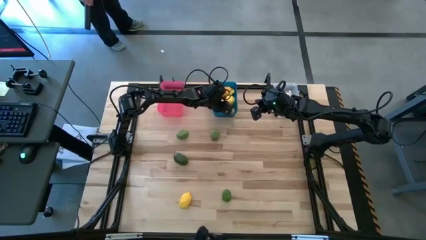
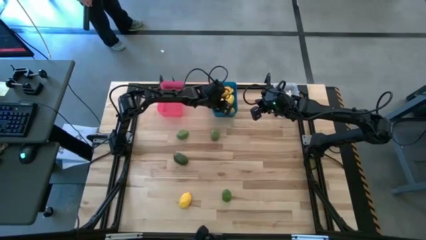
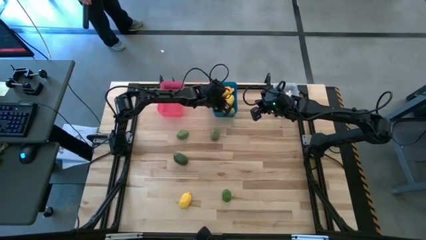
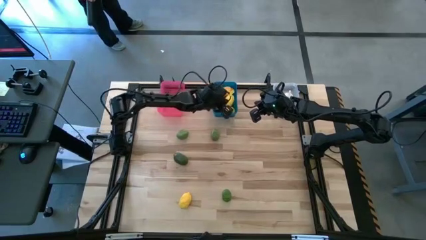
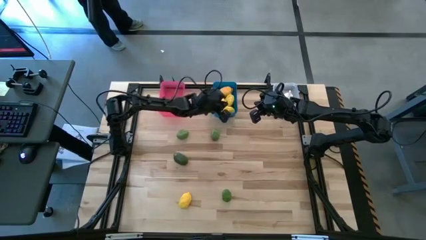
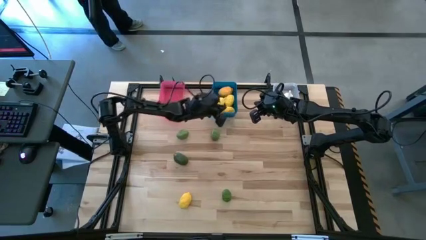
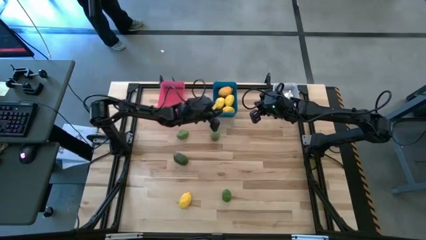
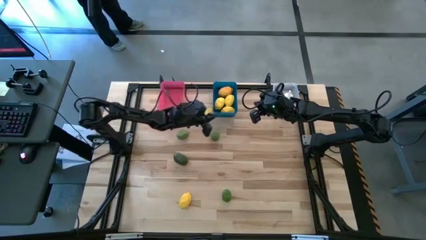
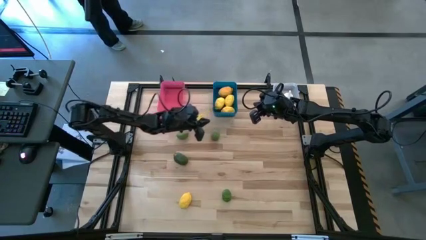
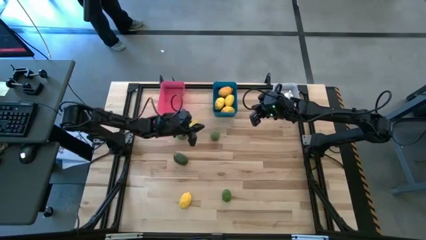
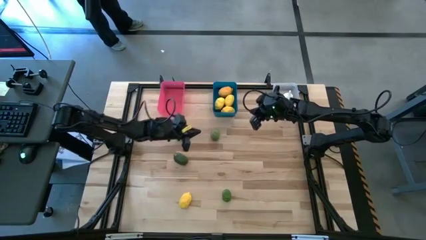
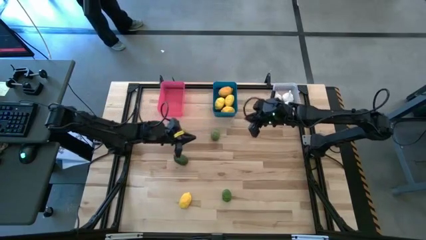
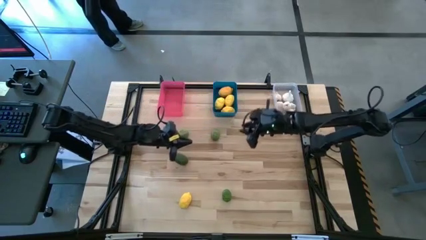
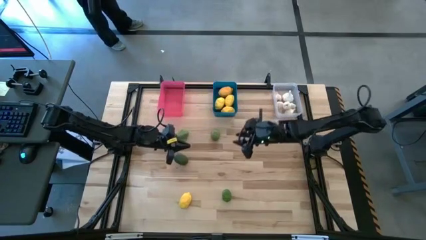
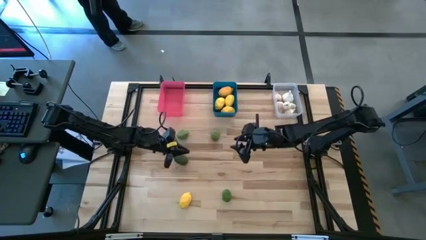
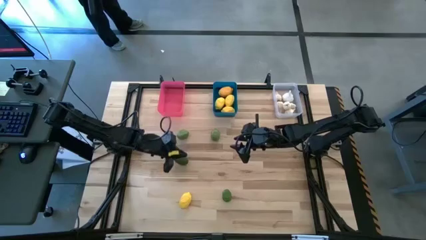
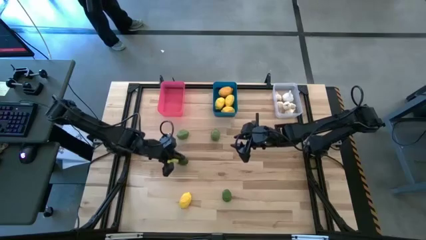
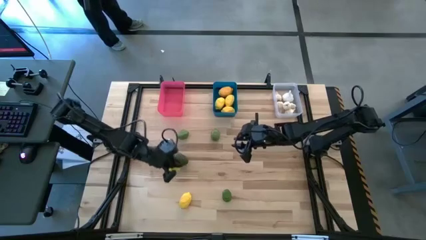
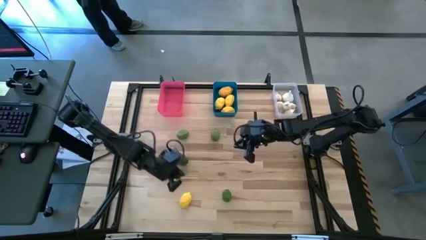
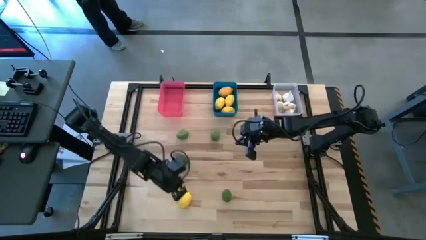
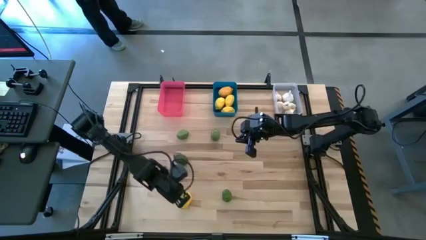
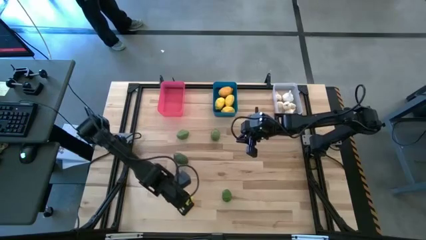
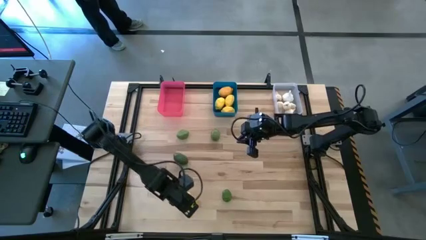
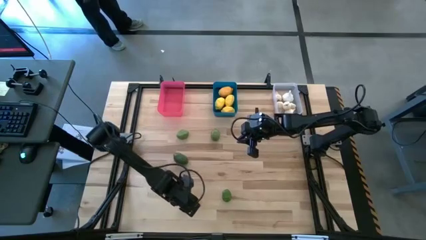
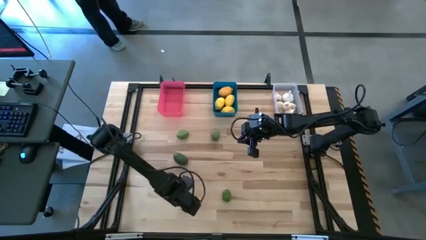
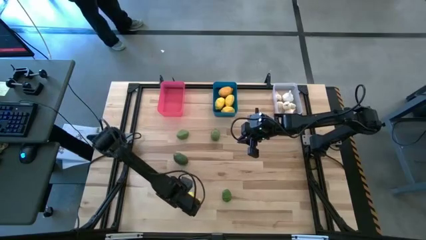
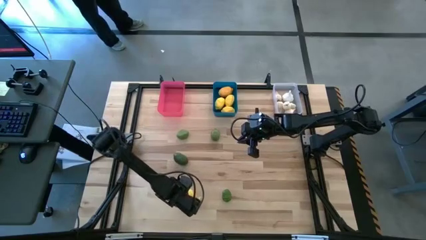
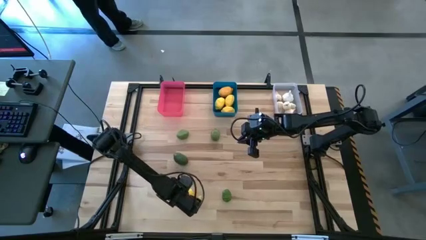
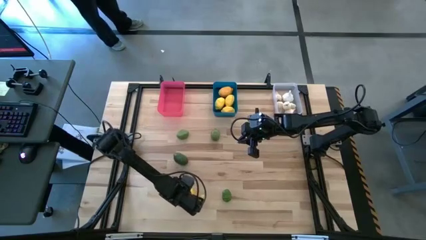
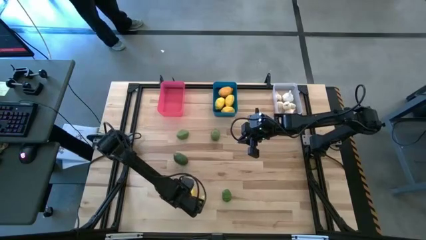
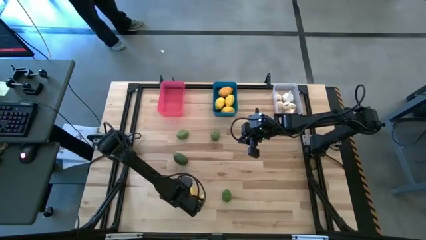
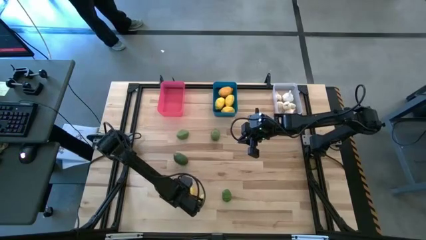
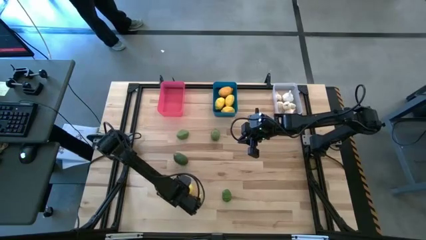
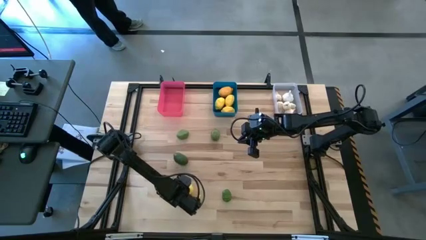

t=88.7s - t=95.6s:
Task: Sort produce into baskets
Put the lemon into the blue bin

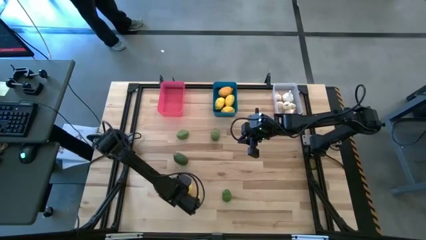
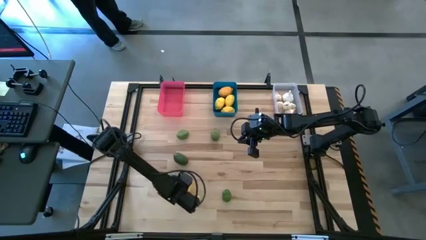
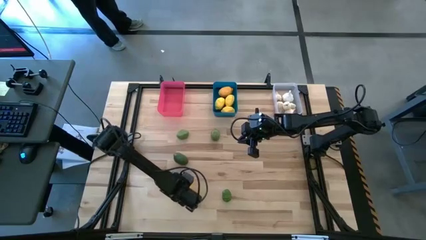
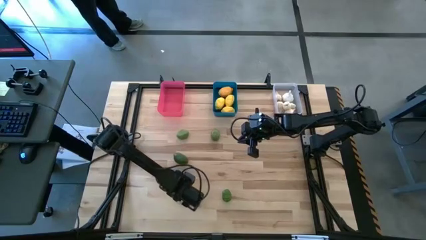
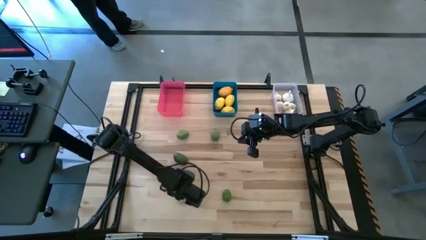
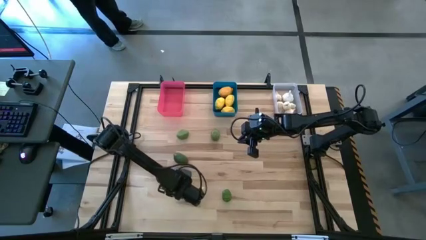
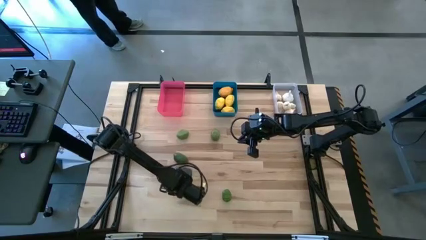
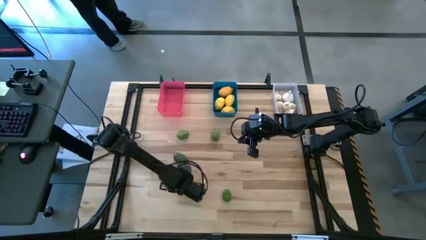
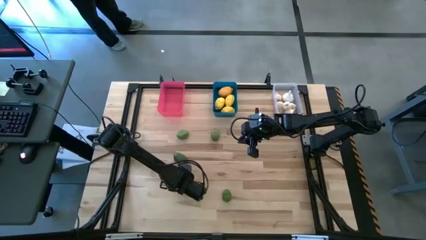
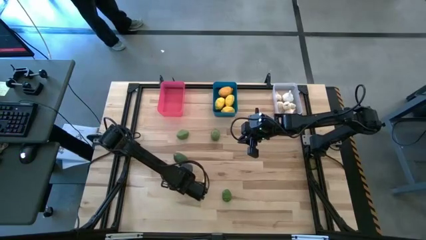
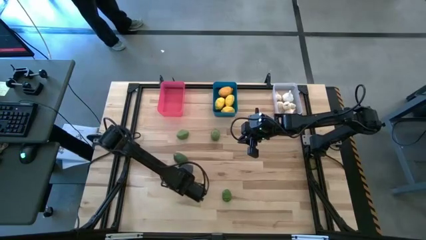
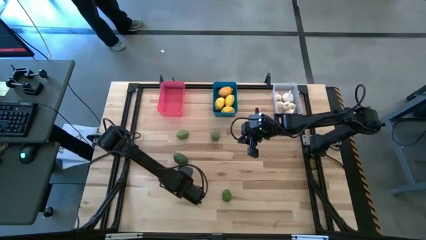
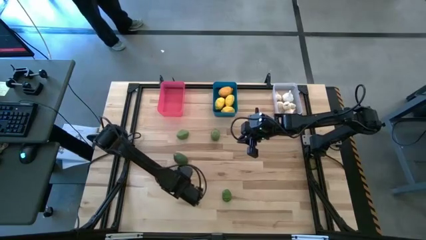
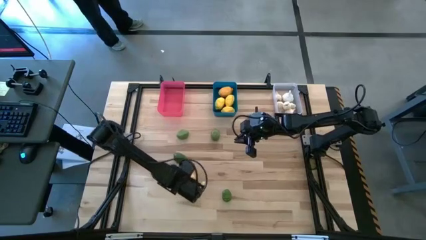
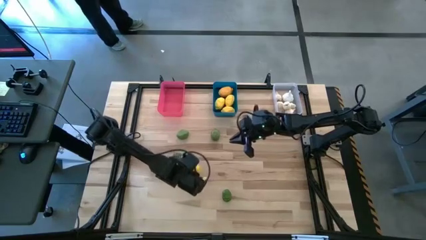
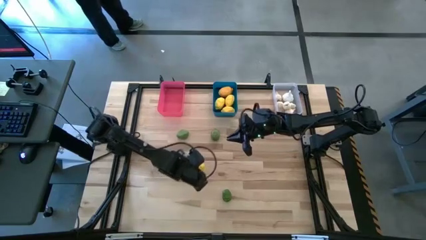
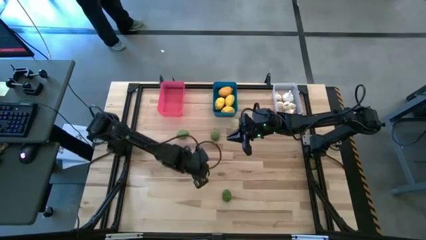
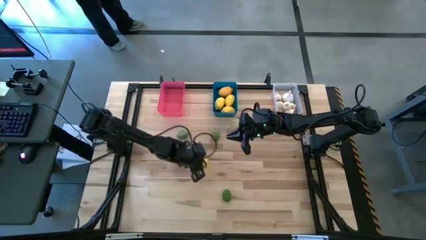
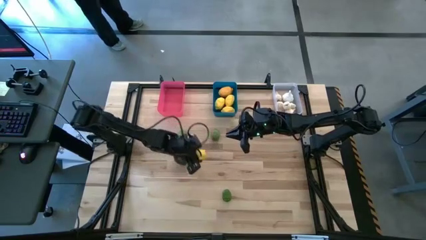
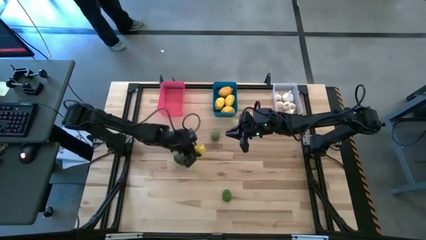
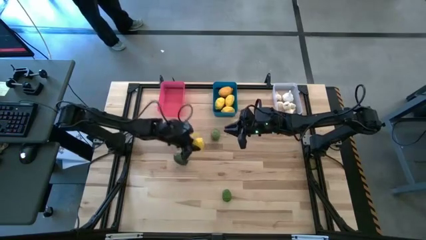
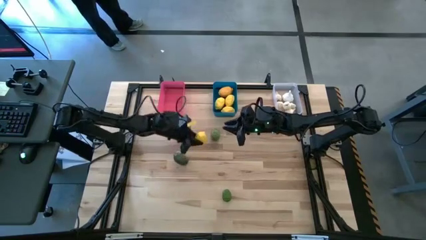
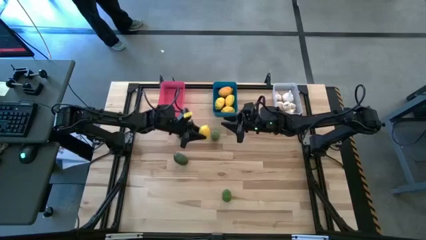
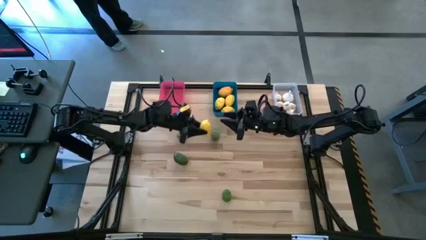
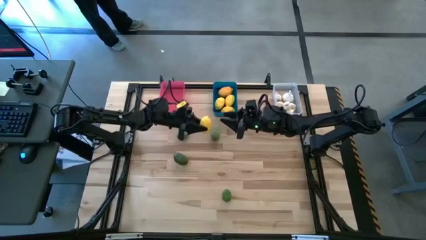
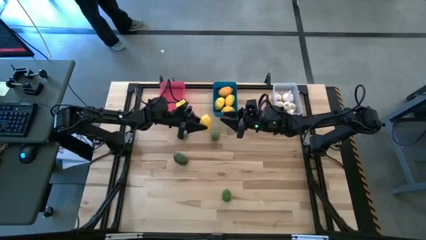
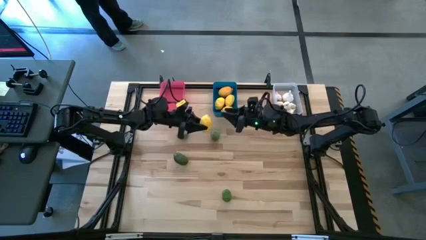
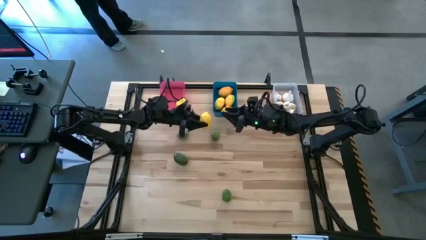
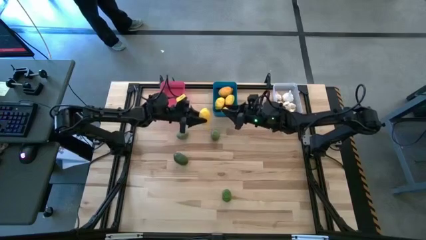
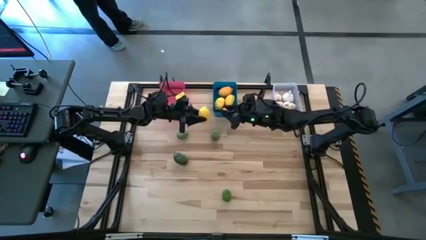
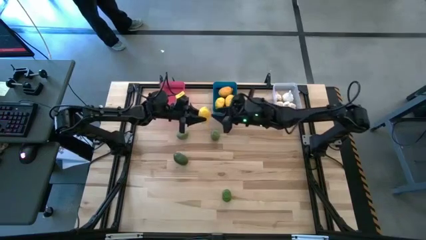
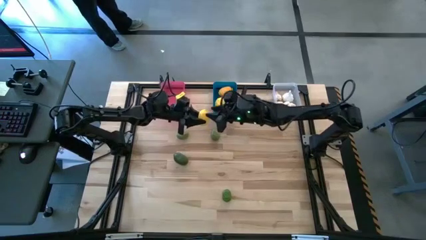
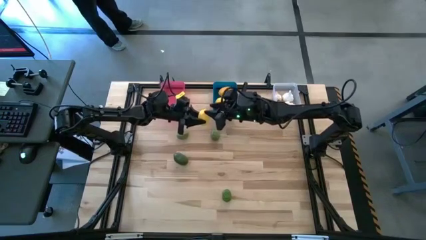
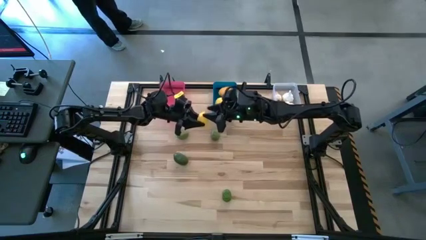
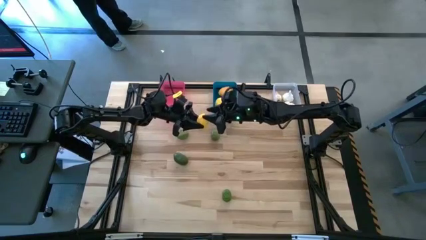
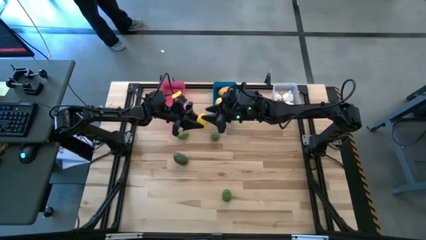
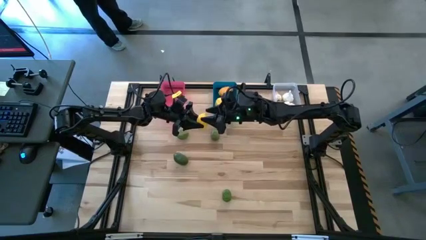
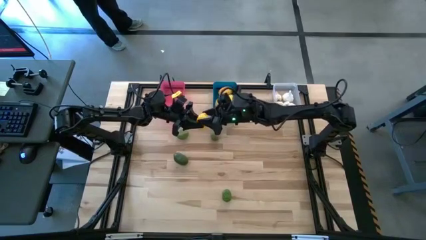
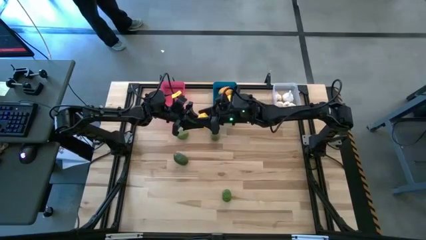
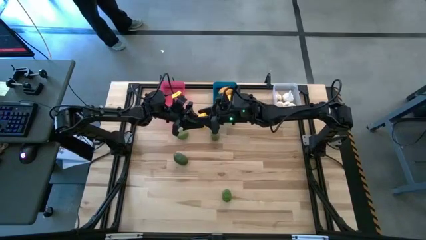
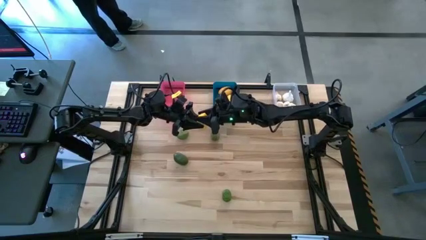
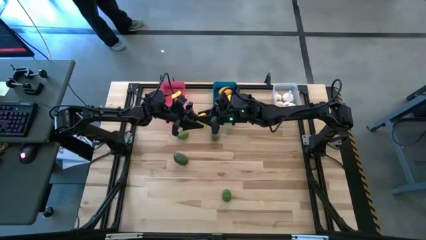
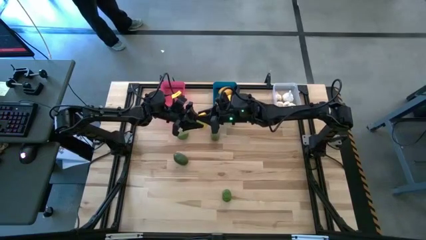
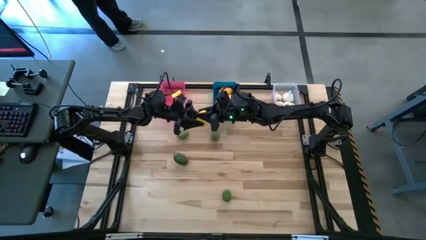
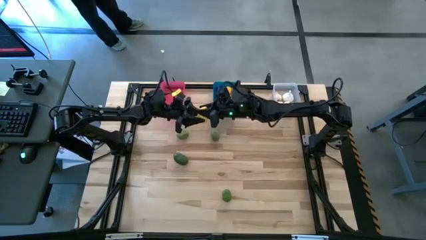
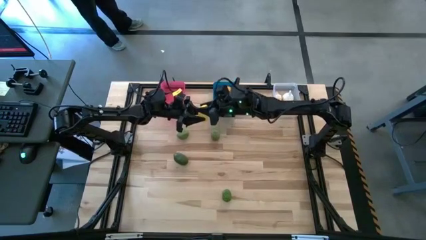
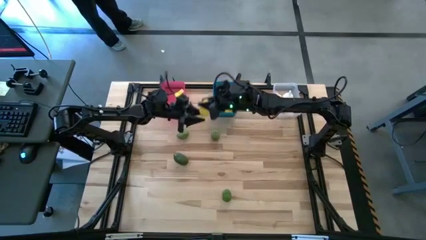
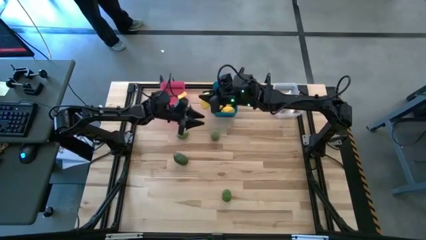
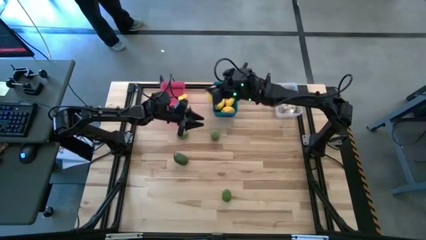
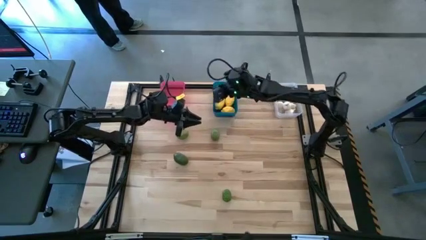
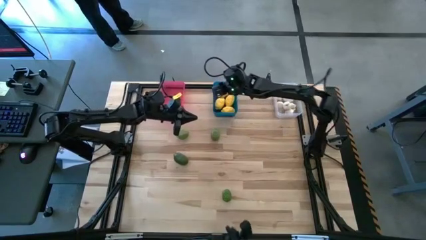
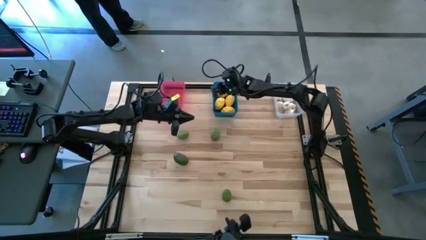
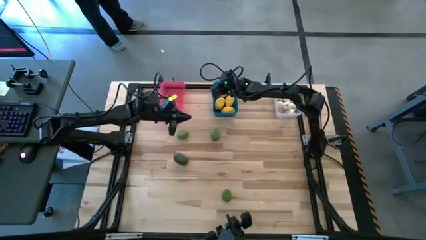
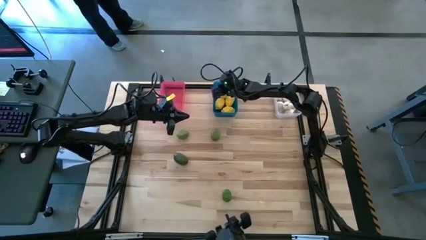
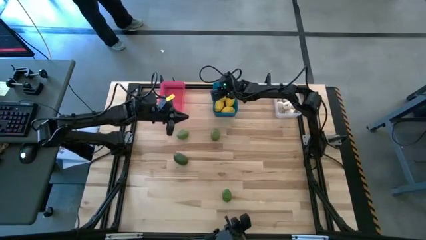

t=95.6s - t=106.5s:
Put the lemon into the blue bin
